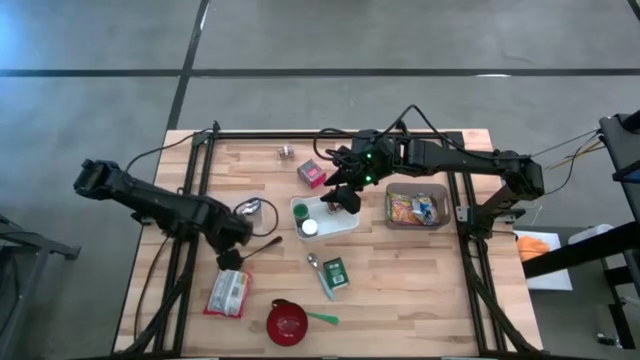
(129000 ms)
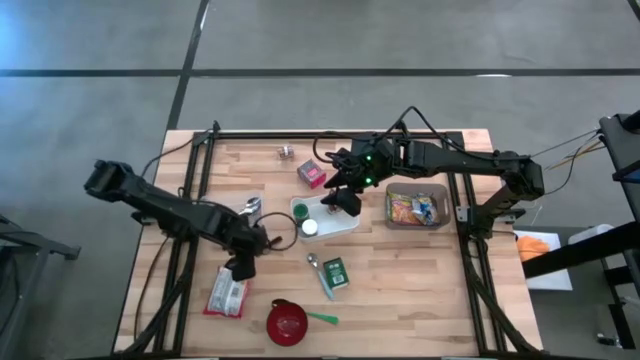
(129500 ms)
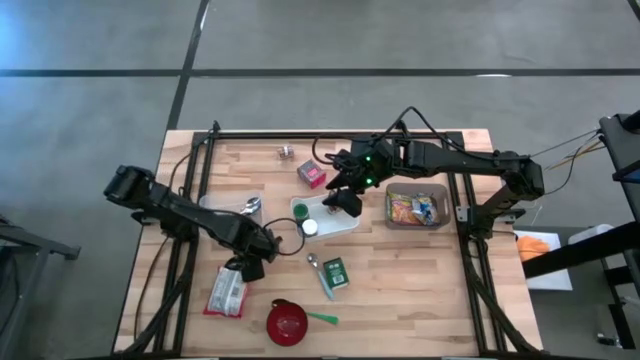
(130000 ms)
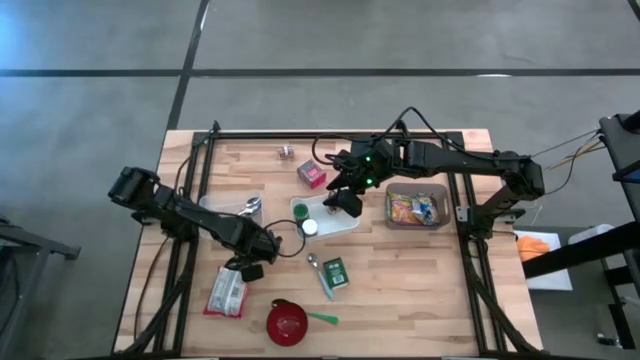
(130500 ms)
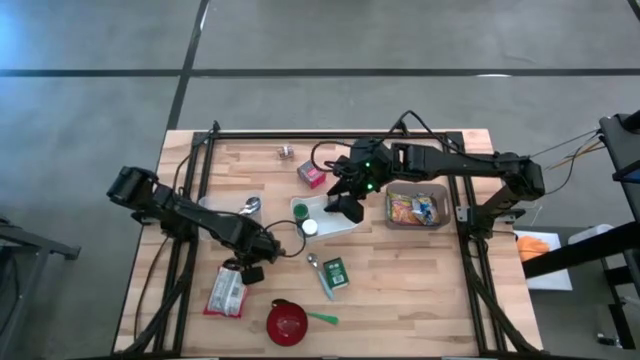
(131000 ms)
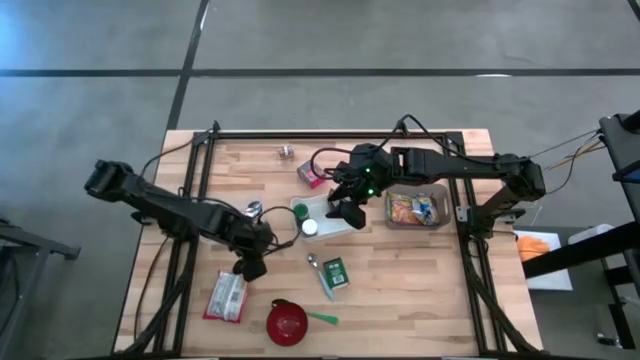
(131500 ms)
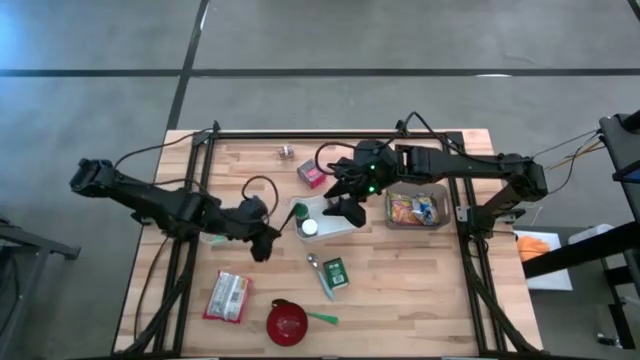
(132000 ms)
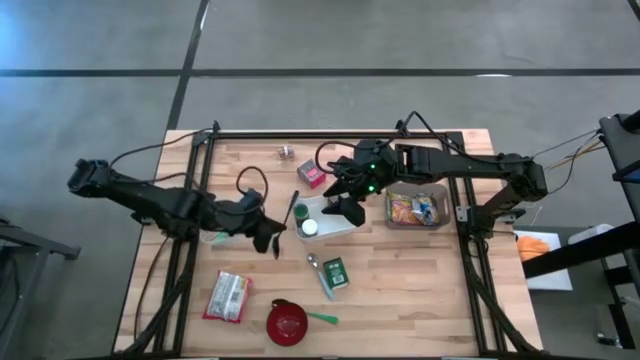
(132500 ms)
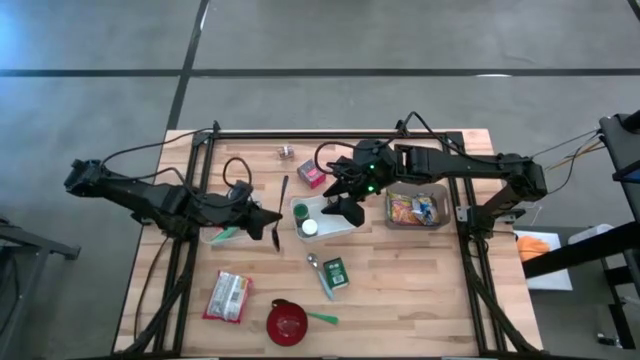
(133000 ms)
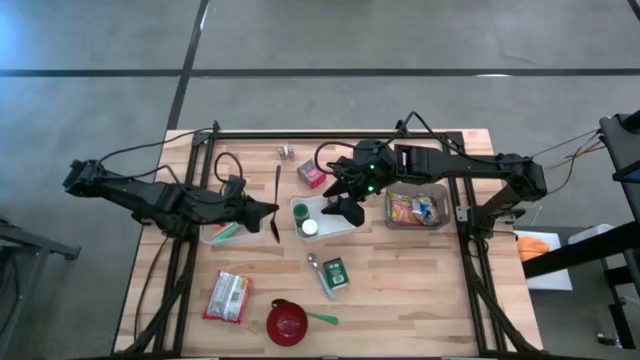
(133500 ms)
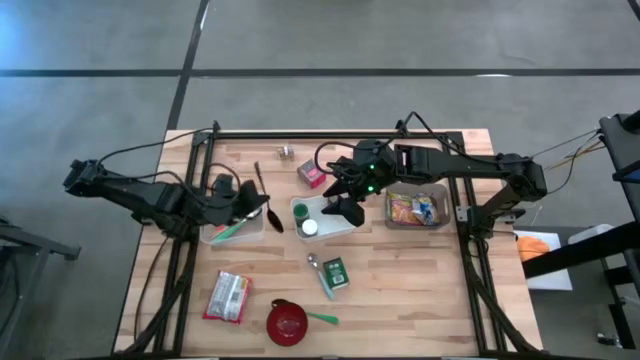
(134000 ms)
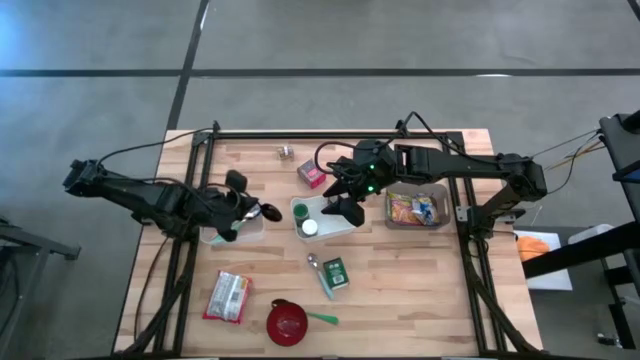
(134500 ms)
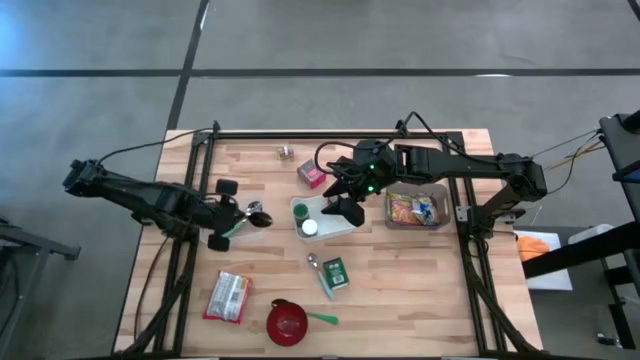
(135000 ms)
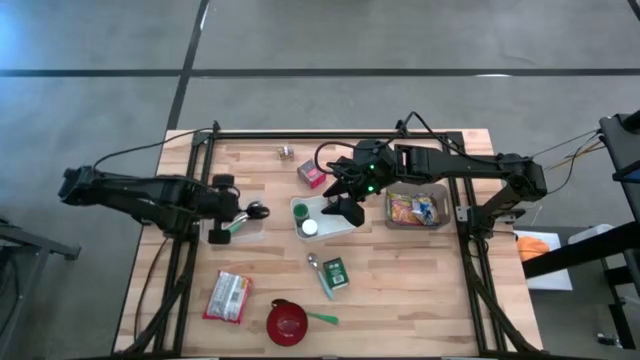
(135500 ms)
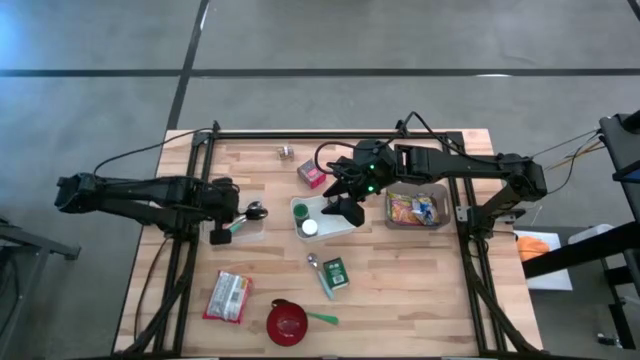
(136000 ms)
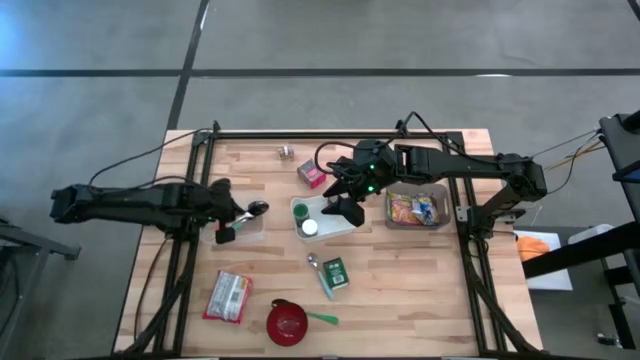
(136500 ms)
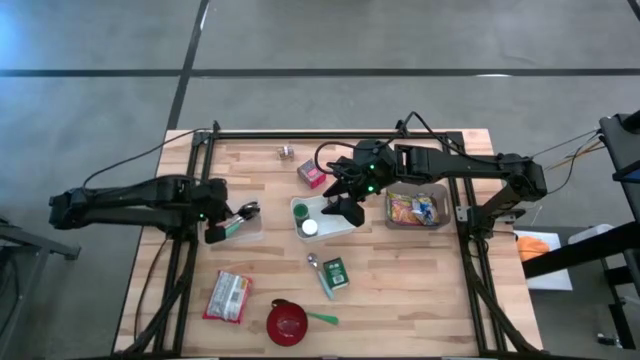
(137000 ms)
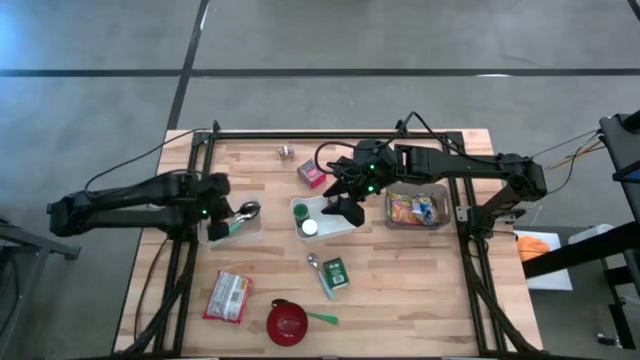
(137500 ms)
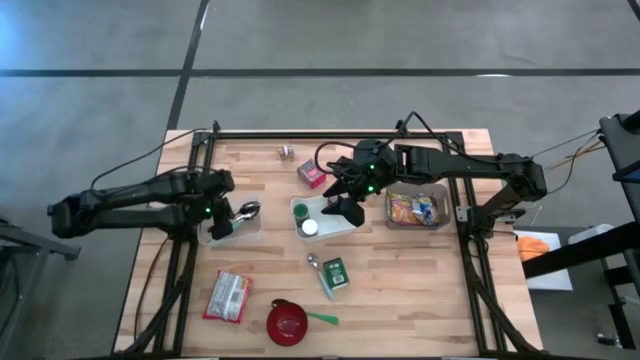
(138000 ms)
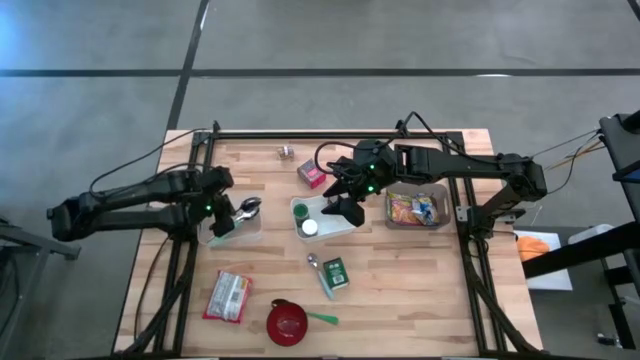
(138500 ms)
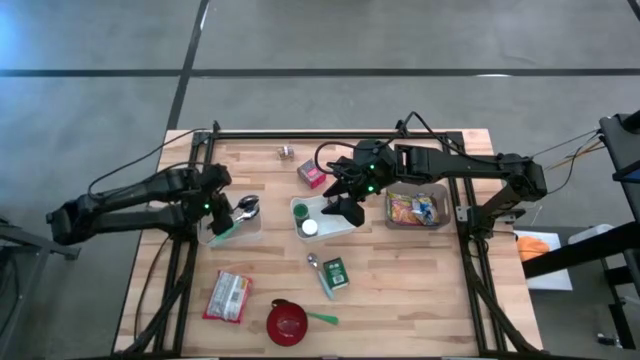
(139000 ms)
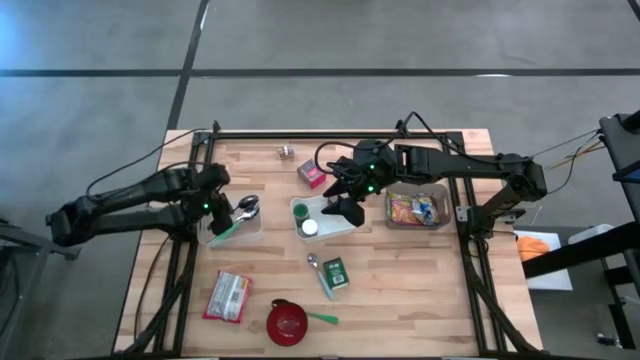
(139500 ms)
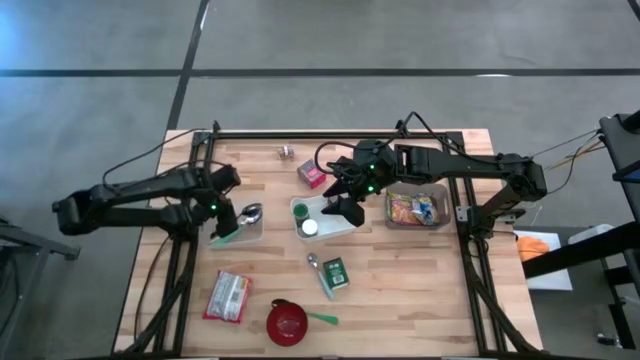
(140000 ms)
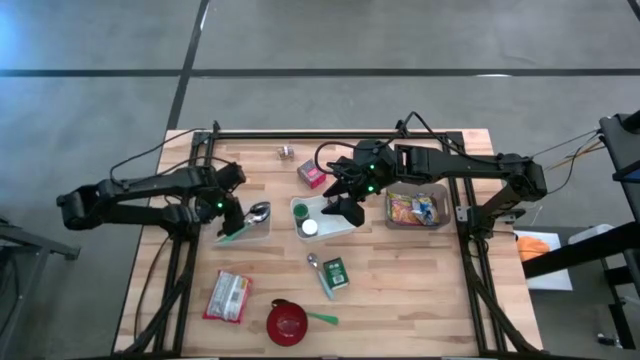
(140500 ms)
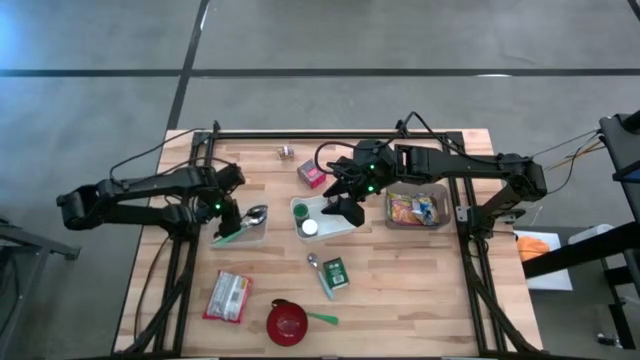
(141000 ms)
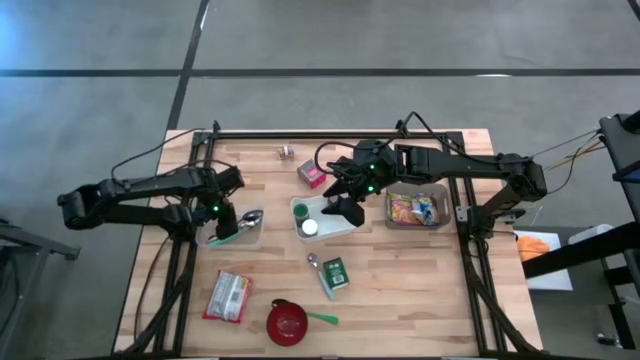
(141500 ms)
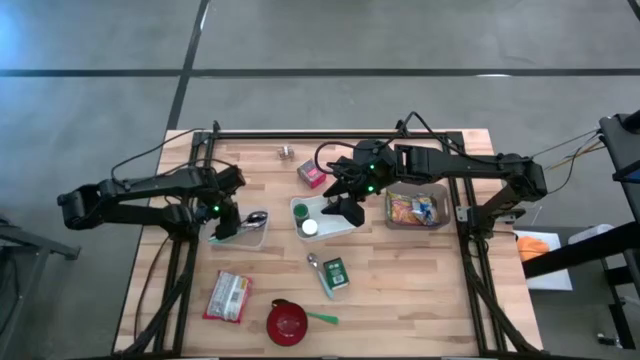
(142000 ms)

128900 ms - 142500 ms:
Put the black spoon into the transparent bin
